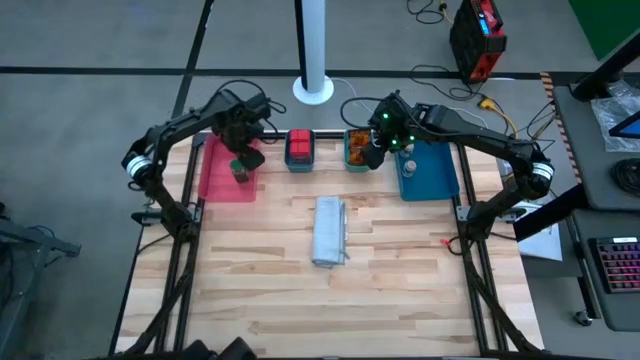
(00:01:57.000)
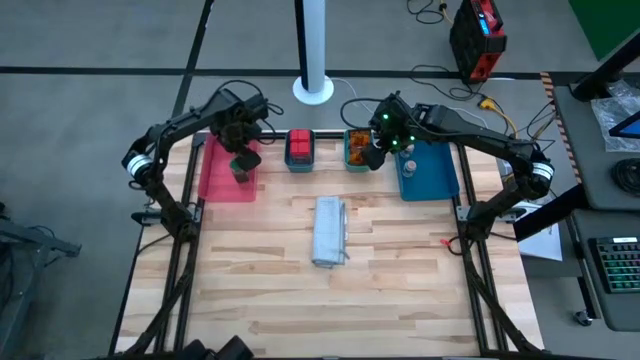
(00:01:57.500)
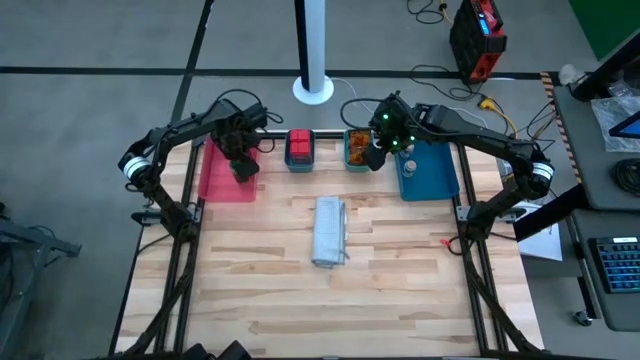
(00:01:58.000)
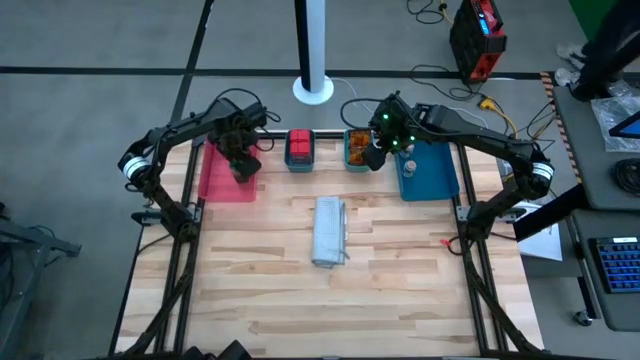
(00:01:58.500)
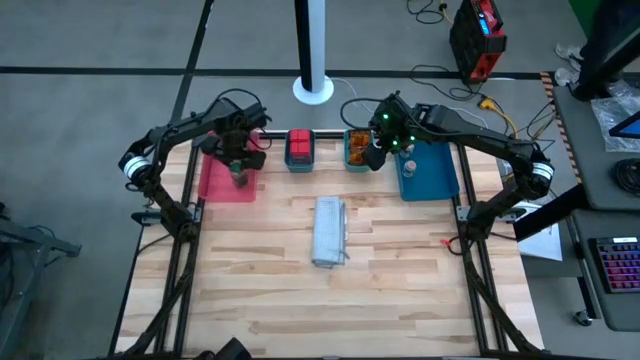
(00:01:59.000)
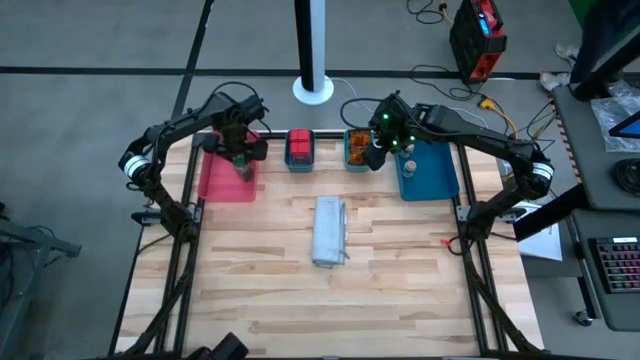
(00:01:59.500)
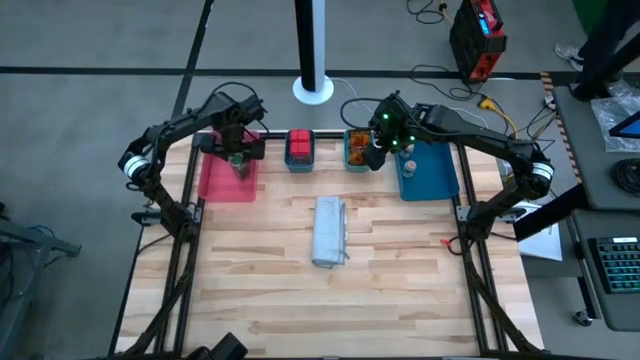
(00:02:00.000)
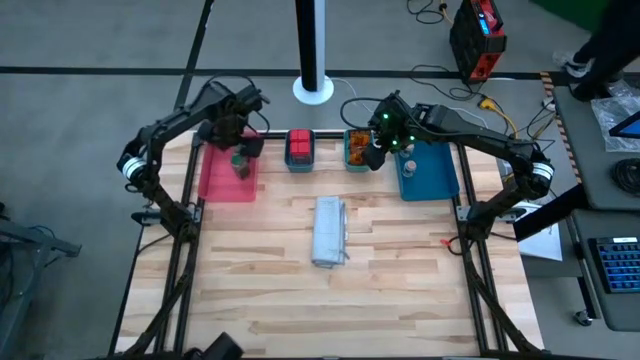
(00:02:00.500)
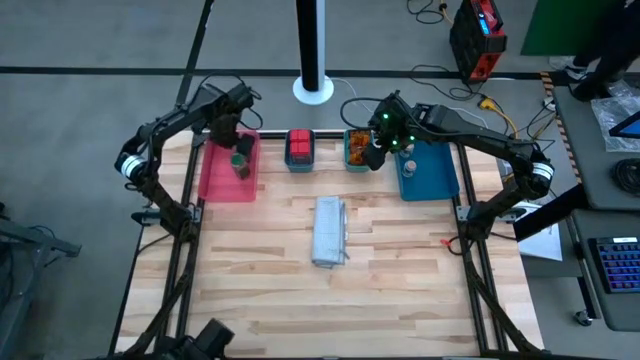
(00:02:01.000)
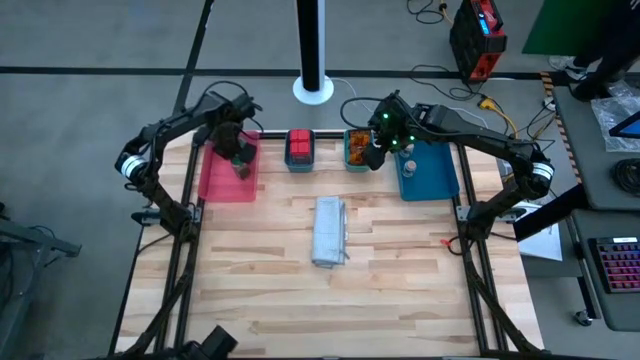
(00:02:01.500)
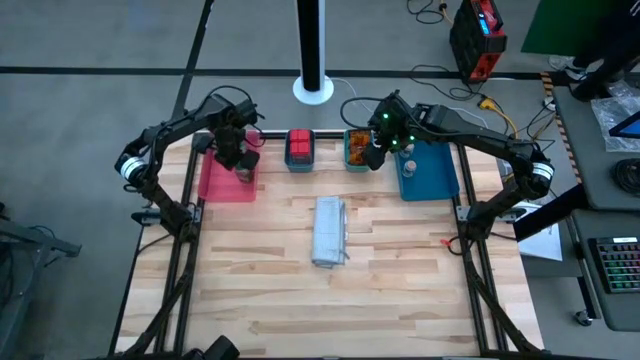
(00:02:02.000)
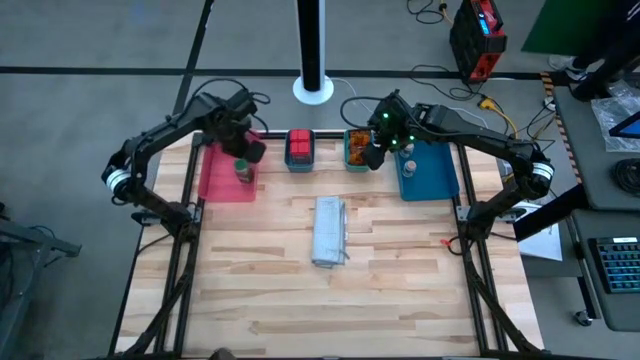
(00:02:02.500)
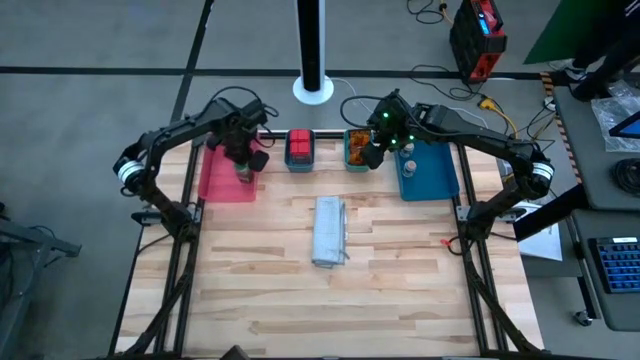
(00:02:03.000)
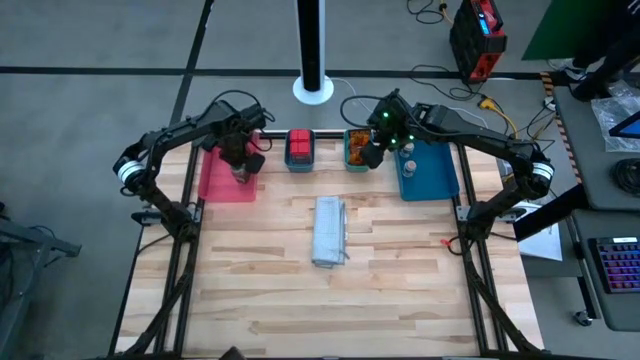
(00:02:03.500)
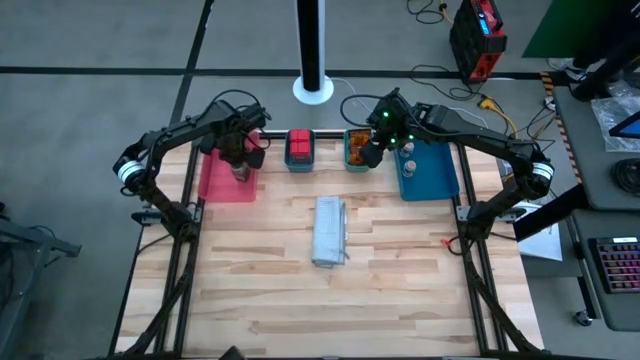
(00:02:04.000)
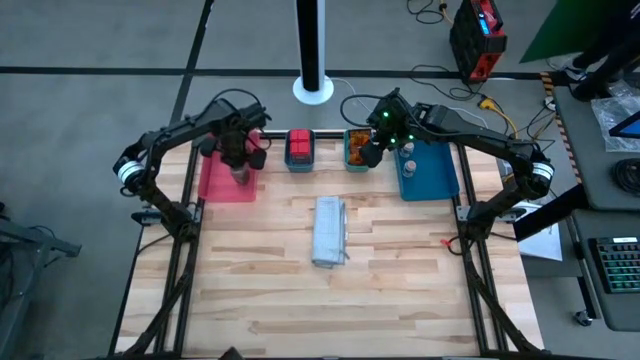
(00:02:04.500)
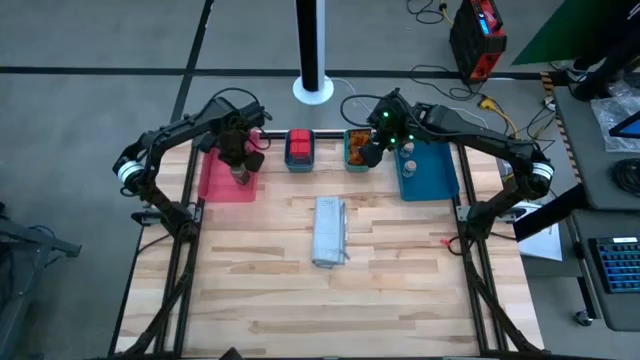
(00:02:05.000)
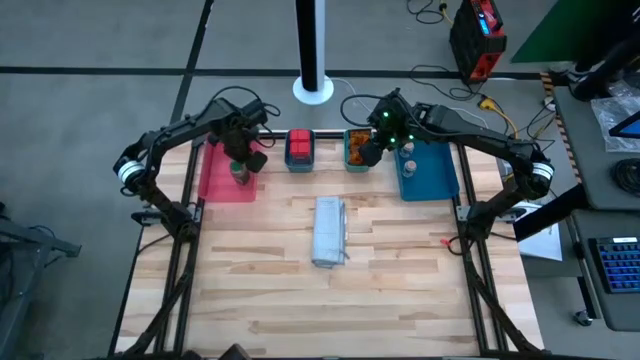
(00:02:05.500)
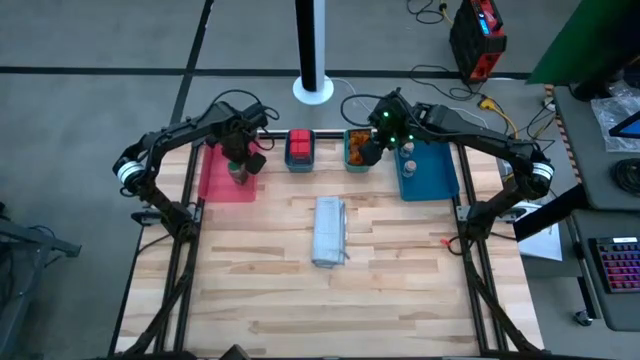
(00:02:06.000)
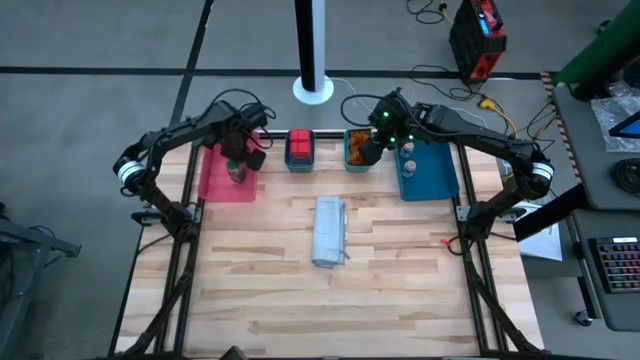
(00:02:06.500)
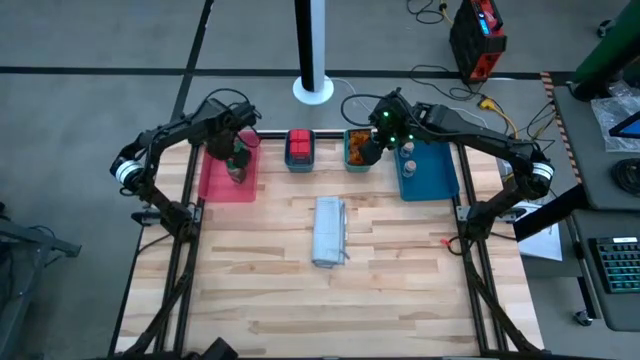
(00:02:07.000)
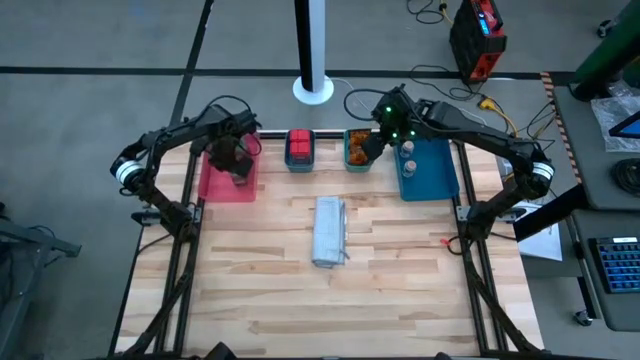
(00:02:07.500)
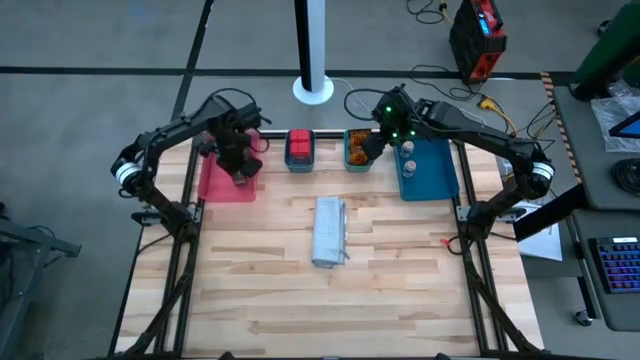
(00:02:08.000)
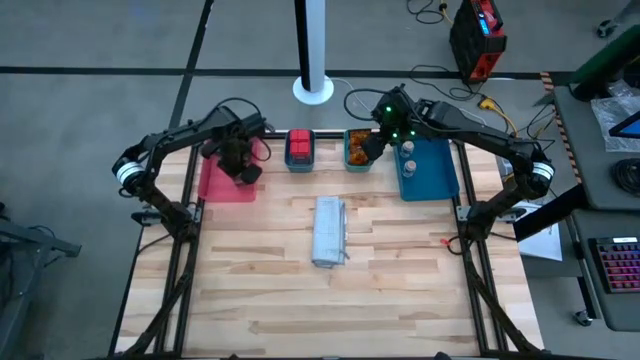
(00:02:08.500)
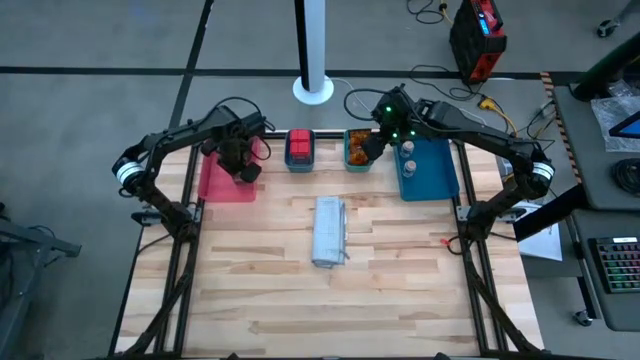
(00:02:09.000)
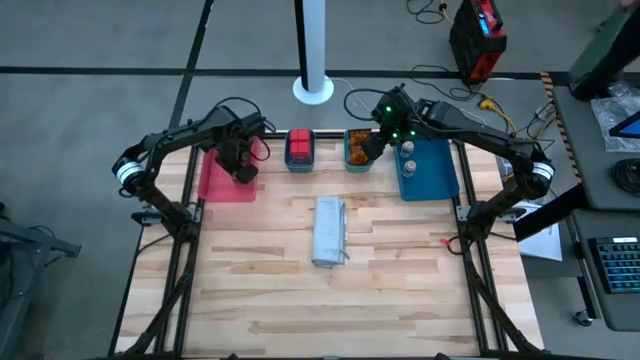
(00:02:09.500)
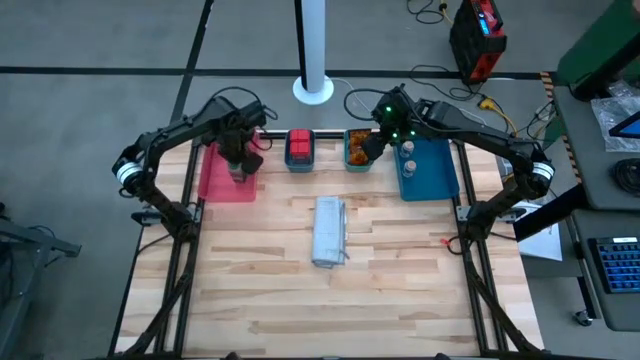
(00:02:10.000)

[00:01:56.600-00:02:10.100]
Task: Sort spices by type
Put the green seasoning bottle into the pink bin

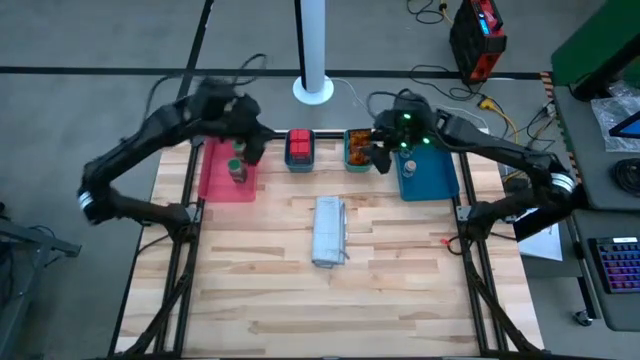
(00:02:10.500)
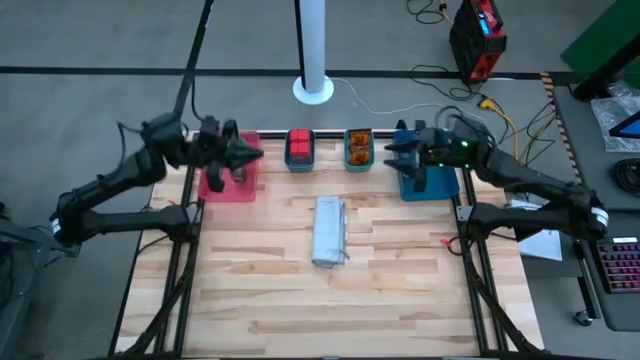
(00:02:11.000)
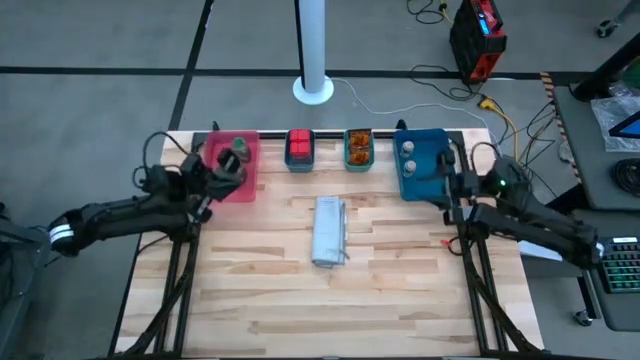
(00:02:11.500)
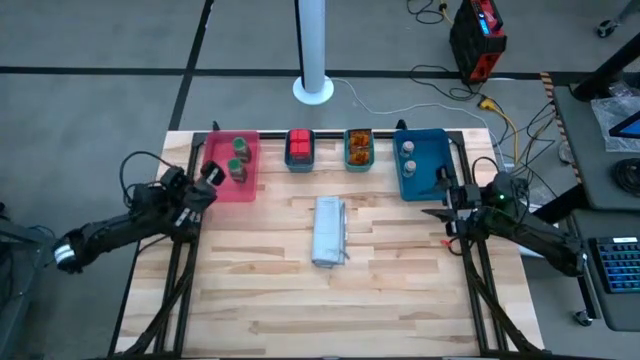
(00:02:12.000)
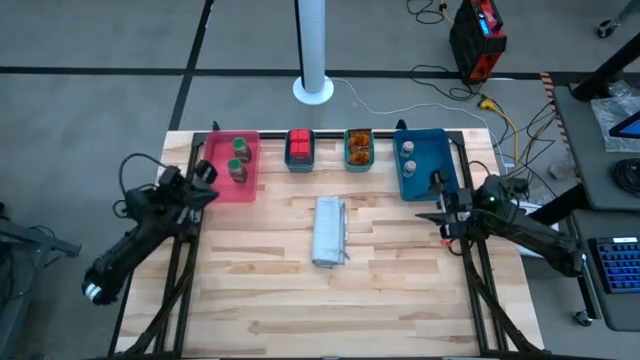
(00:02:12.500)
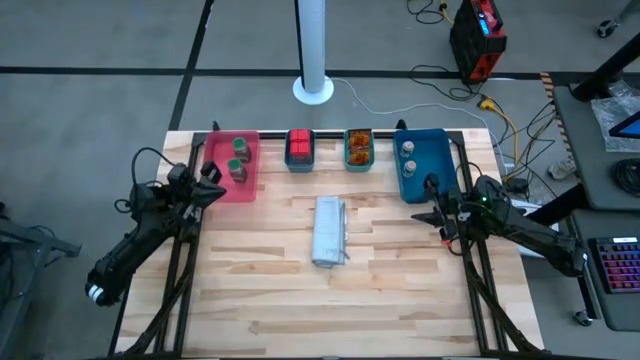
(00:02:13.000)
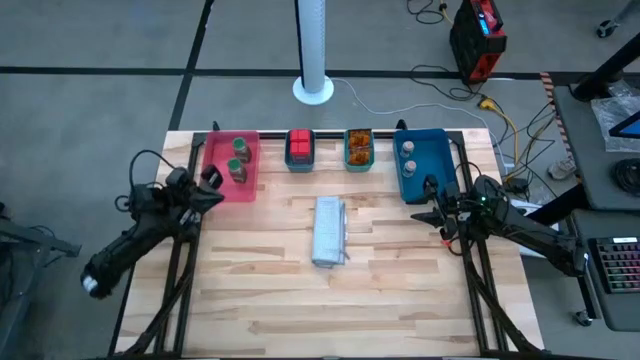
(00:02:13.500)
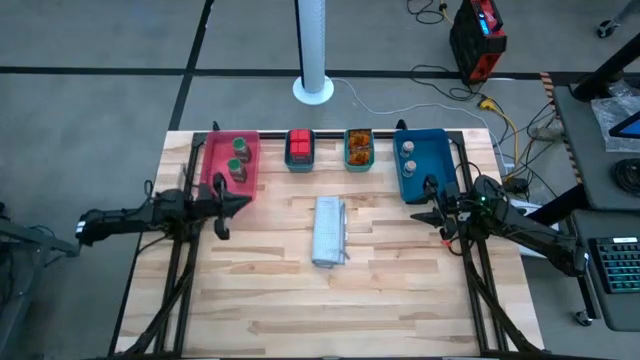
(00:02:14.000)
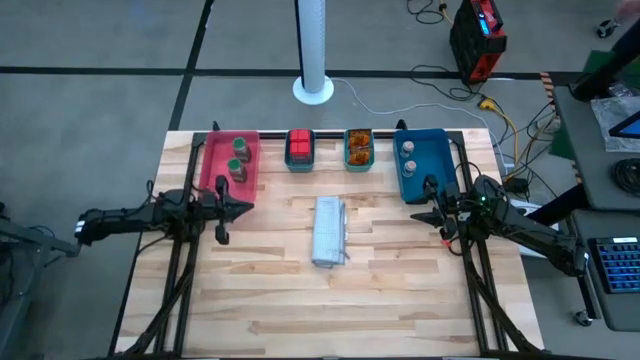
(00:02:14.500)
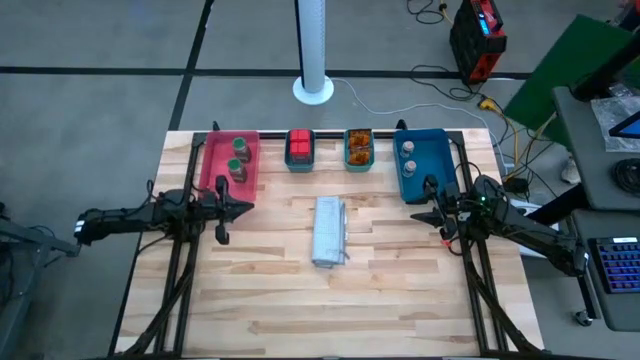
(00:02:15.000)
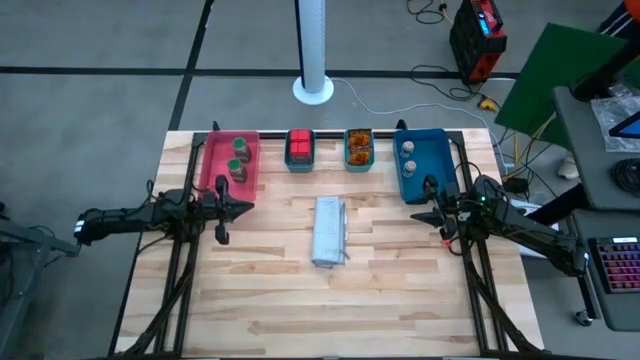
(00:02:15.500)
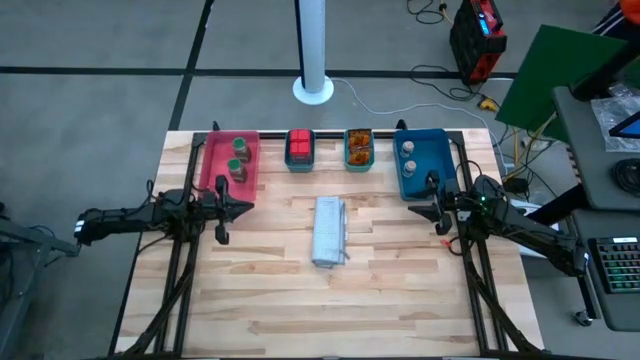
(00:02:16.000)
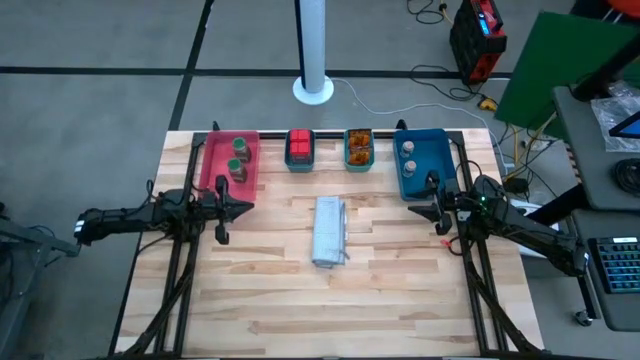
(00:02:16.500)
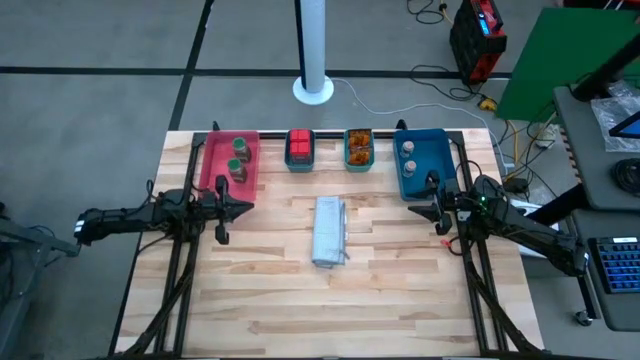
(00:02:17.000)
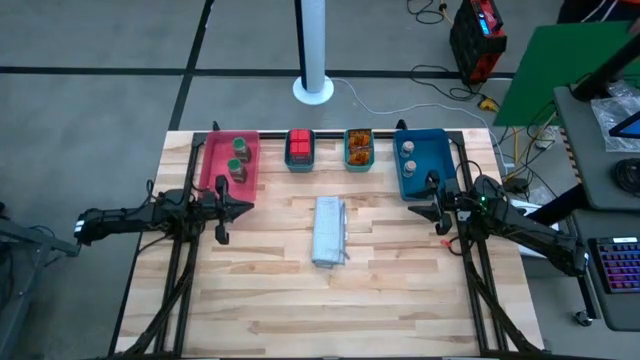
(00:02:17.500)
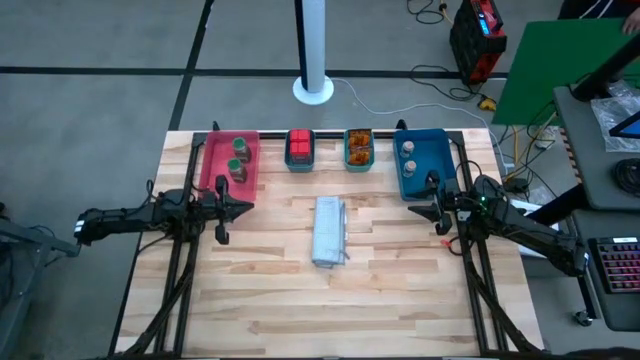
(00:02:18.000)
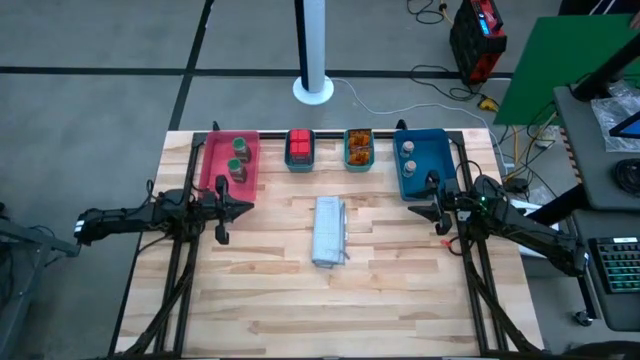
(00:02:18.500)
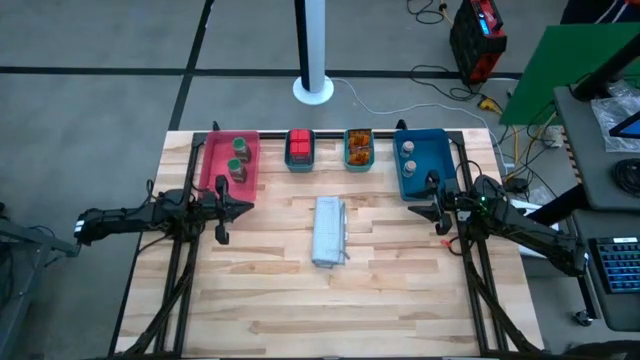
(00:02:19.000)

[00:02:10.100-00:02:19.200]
Return to Home Position
